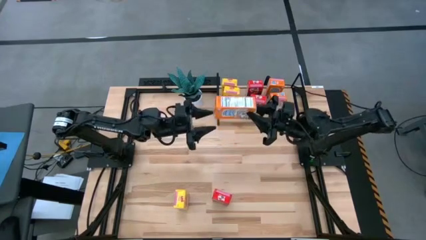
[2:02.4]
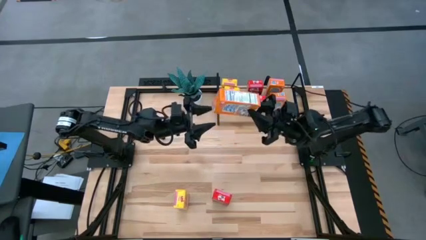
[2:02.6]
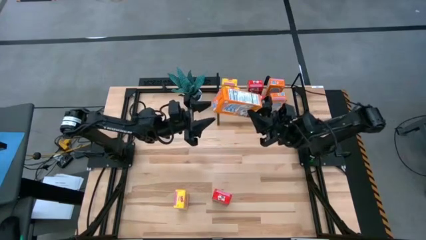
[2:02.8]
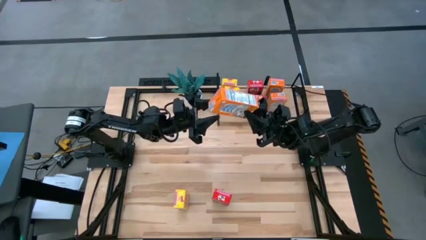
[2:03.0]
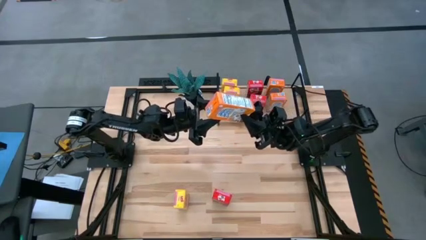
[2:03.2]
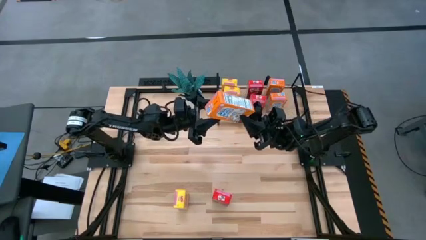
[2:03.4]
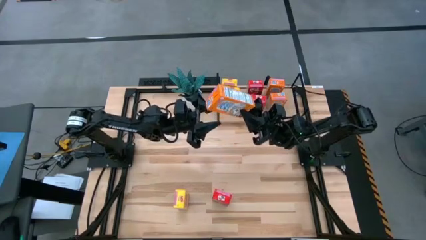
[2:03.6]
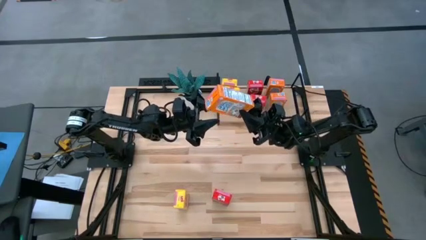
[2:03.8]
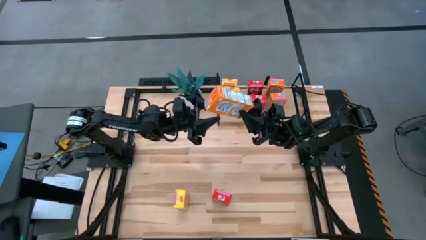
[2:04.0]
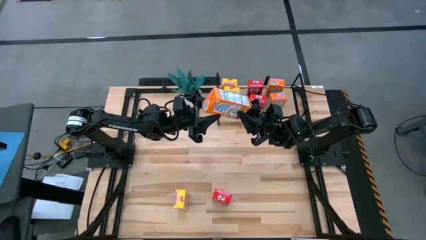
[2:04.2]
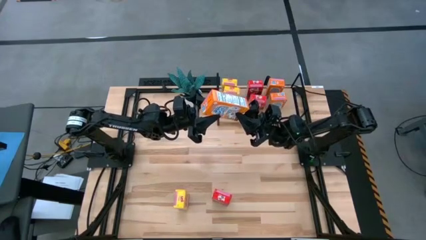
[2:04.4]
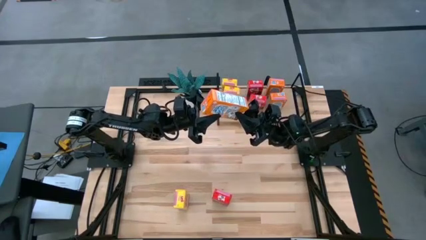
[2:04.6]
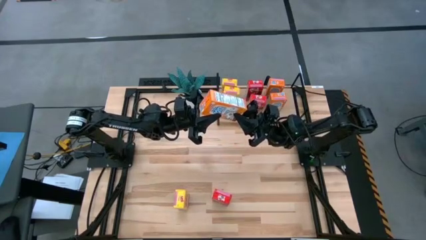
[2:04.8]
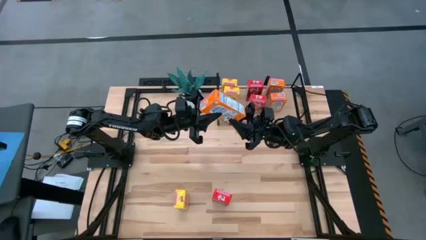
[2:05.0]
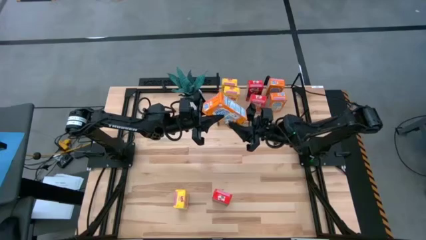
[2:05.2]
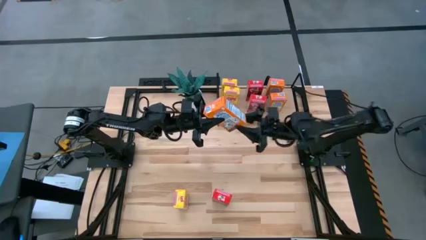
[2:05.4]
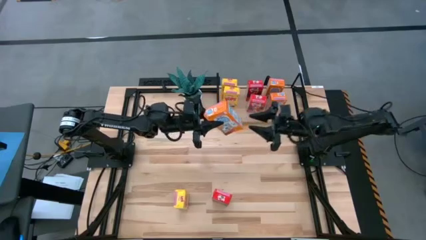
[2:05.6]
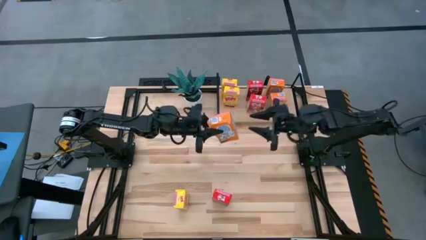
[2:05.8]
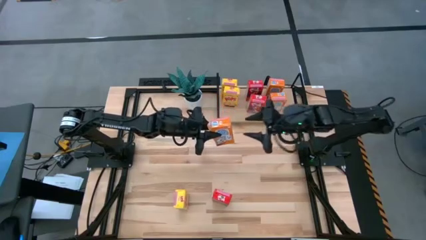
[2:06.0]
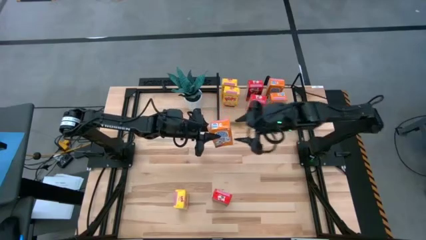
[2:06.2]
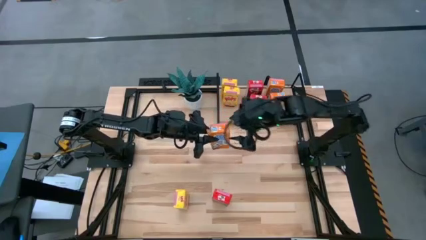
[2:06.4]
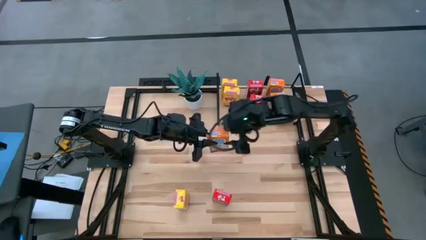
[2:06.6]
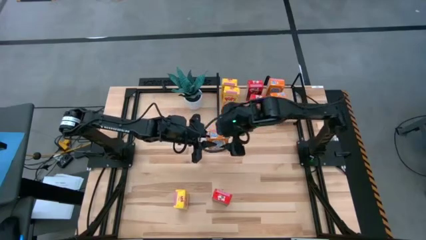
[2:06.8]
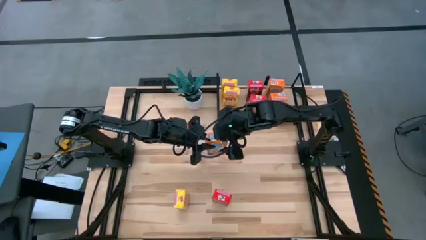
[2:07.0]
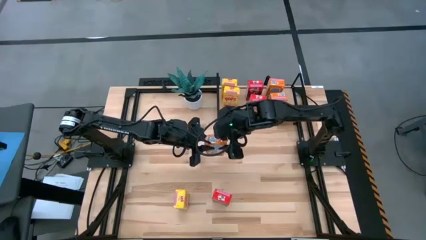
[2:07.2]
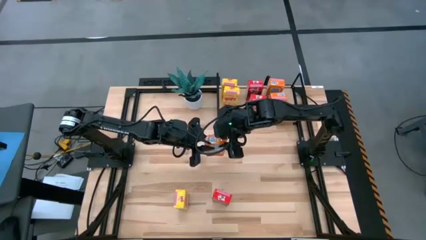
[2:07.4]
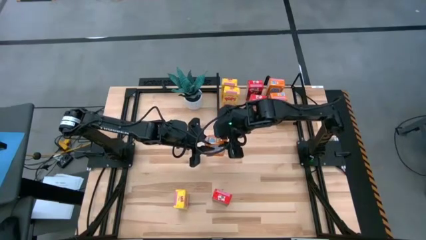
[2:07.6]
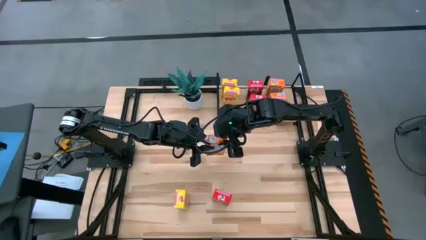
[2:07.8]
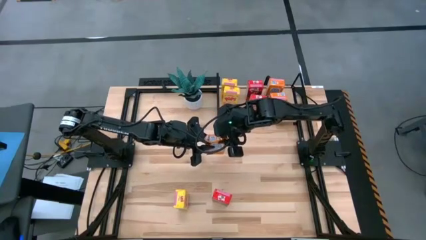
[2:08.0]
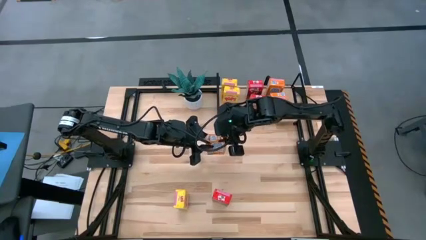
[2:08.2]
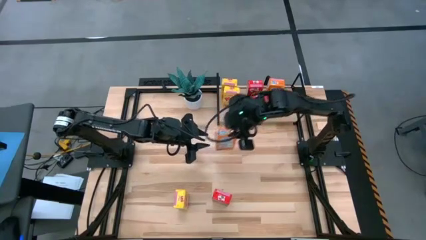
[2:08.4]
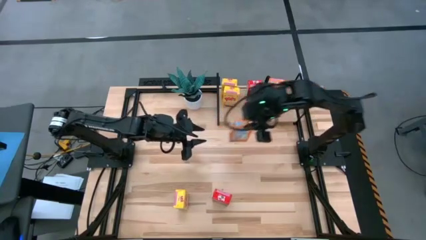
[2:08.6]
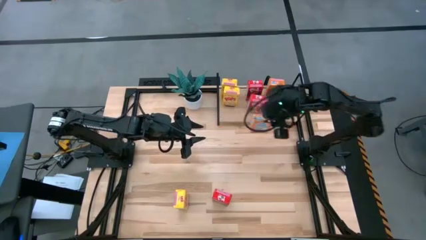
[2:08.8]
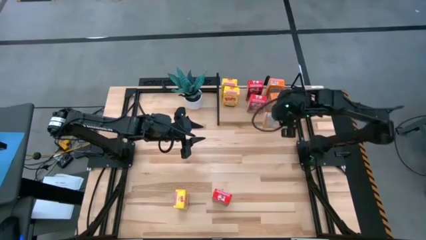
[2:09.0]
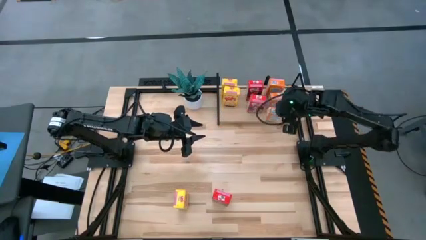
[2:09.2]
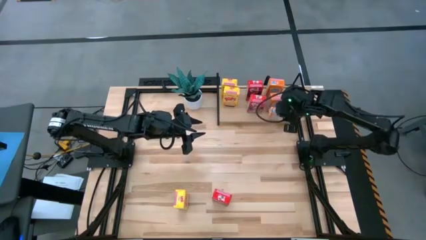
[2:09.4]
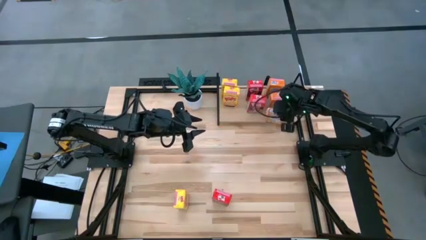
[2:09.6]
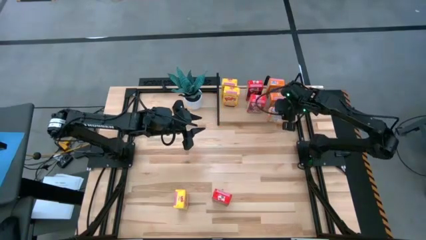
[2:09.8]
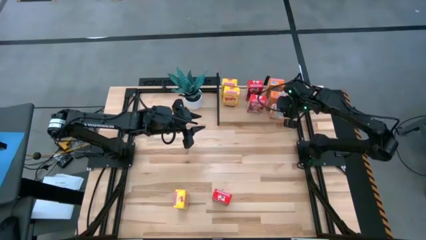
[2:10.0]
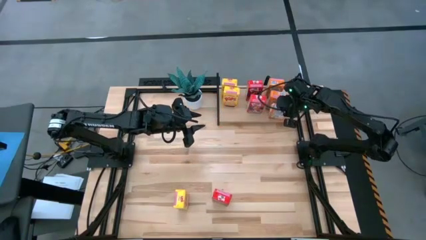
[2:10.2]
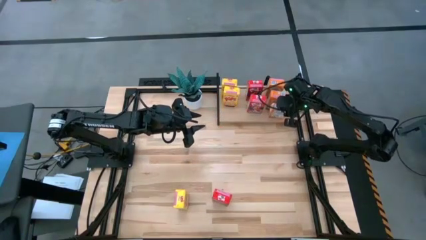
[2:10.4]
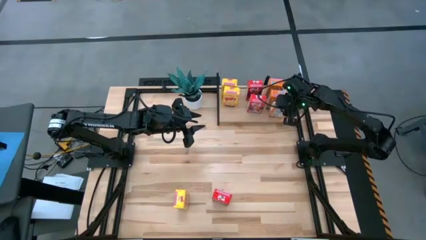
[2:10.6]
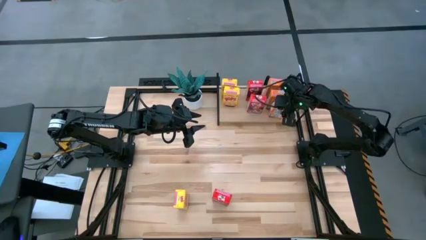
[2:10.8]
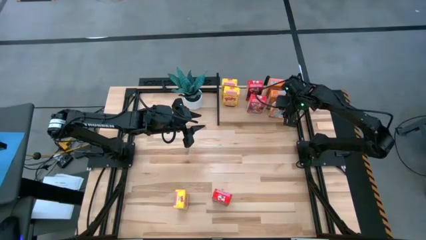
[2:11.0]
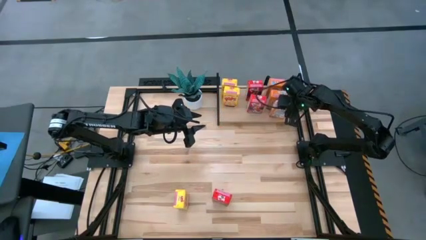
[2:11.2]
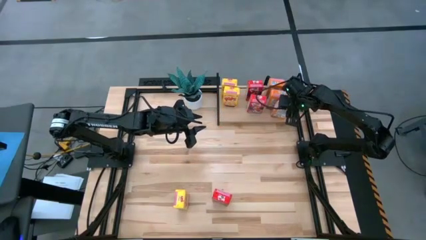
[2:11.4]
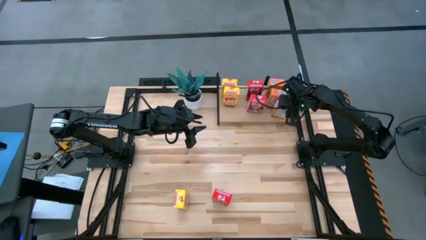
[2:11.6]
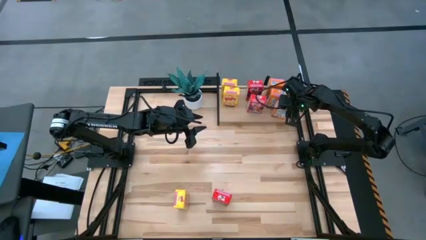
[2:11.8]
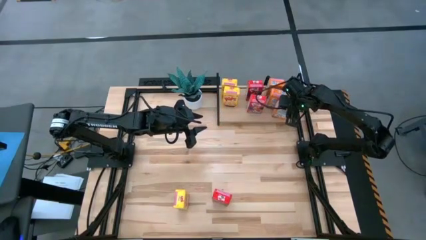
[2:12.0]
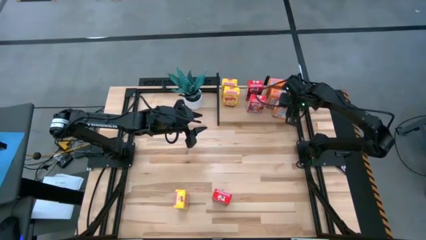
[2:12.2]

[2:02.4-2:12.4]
Task: Stack cereal on shelf
Put the orange cereal box on the shelf aligned with orange cereal boxes

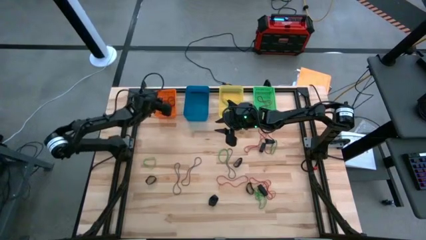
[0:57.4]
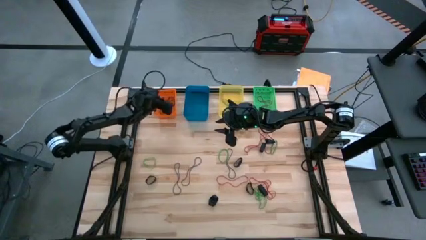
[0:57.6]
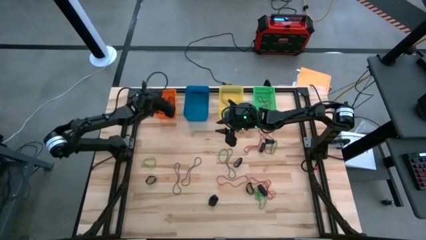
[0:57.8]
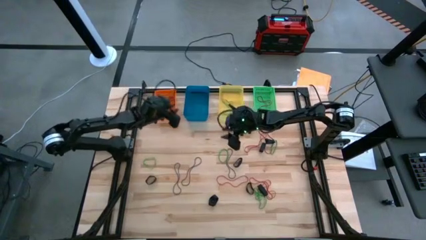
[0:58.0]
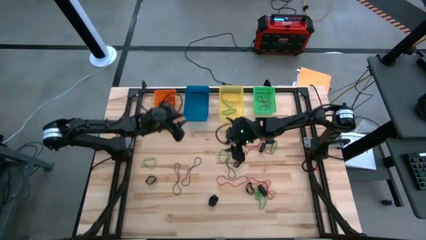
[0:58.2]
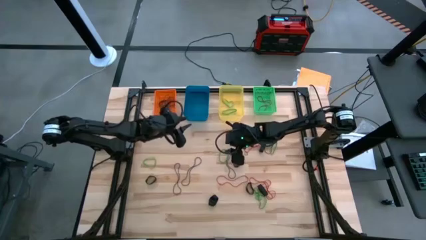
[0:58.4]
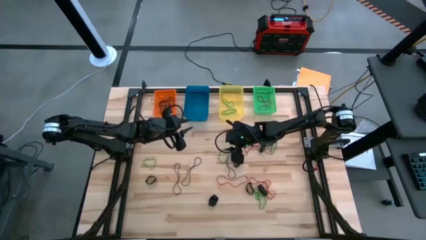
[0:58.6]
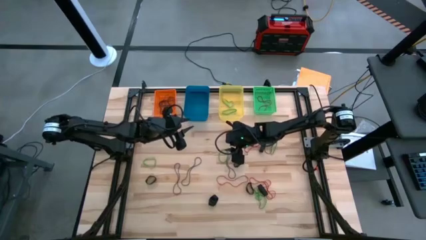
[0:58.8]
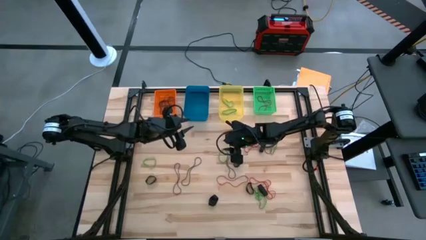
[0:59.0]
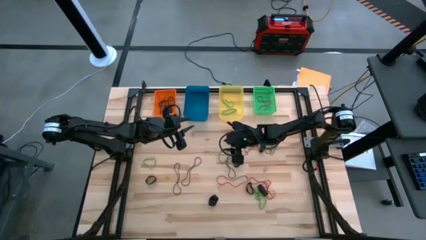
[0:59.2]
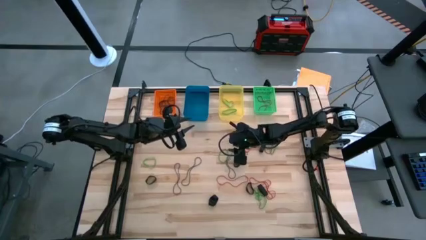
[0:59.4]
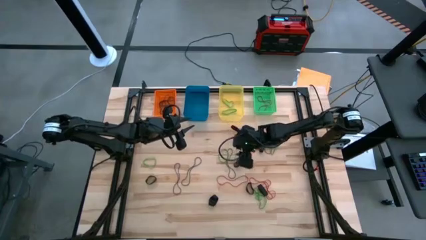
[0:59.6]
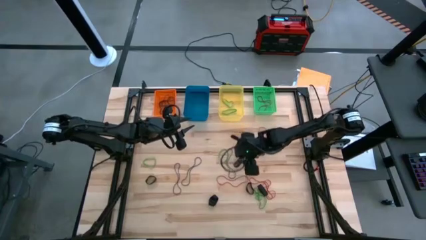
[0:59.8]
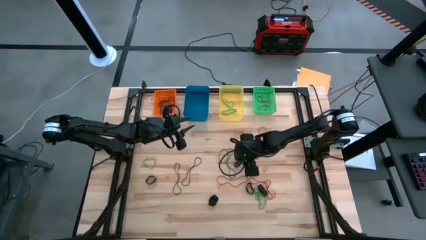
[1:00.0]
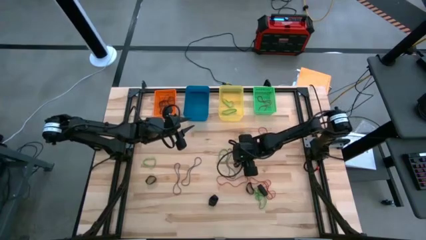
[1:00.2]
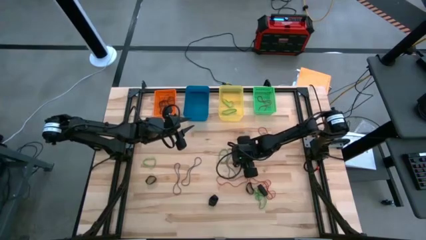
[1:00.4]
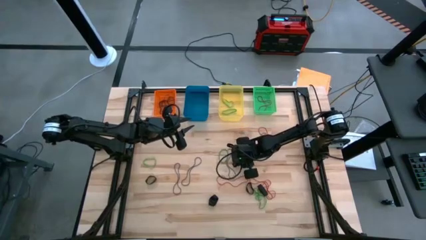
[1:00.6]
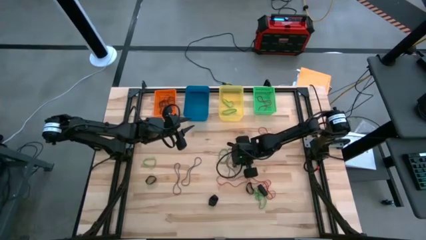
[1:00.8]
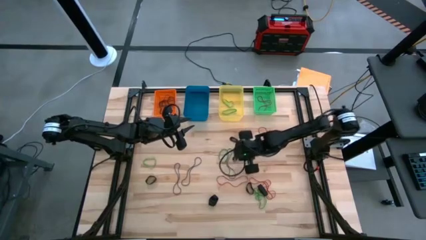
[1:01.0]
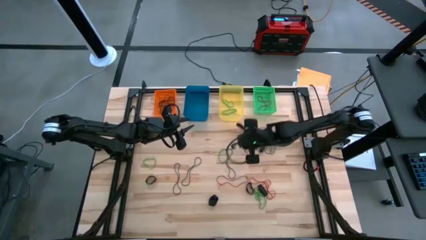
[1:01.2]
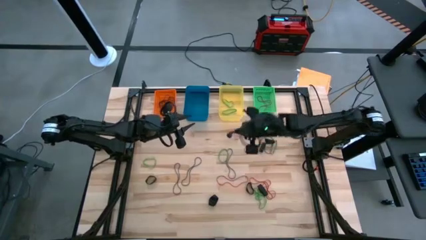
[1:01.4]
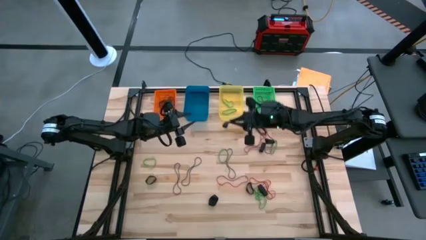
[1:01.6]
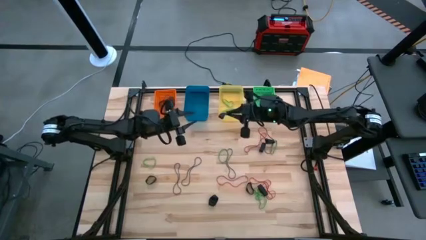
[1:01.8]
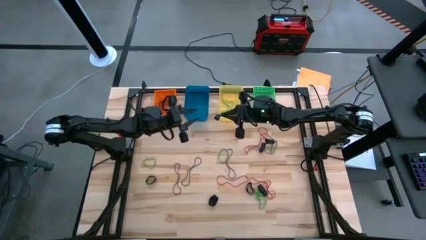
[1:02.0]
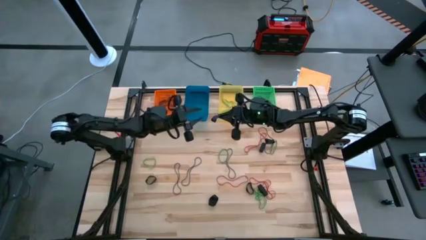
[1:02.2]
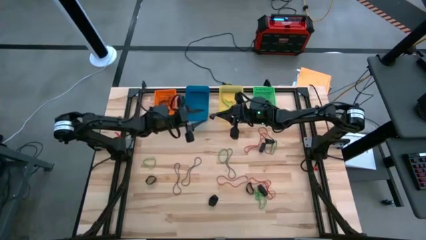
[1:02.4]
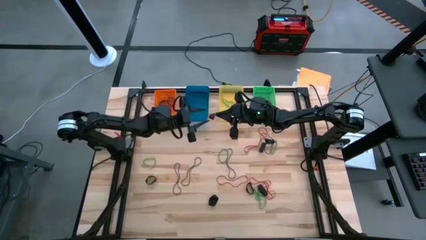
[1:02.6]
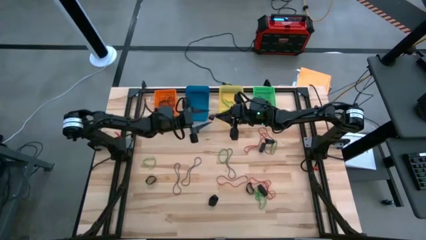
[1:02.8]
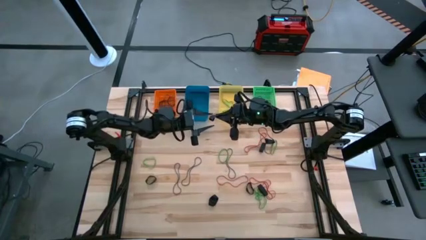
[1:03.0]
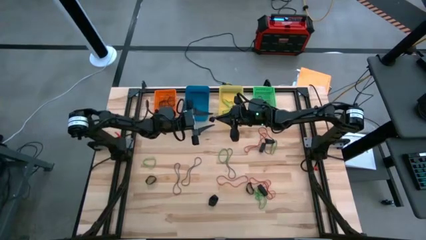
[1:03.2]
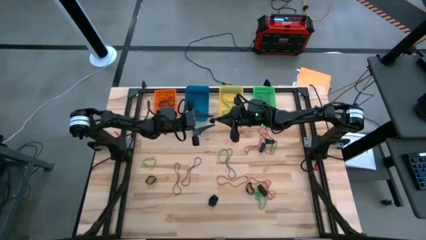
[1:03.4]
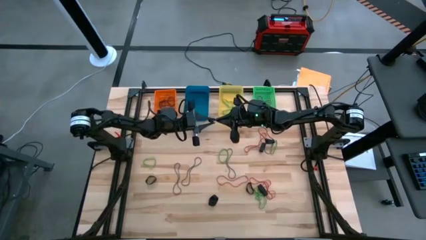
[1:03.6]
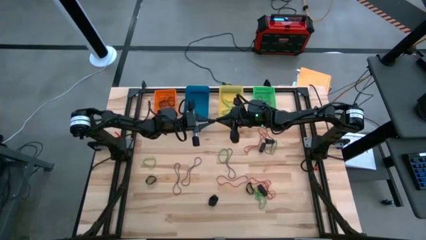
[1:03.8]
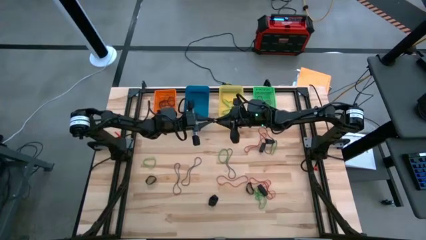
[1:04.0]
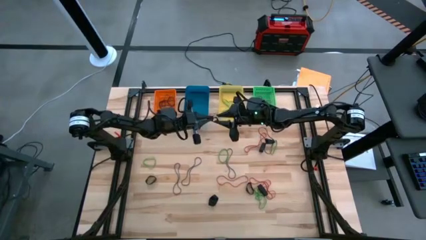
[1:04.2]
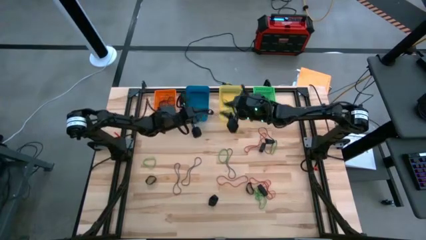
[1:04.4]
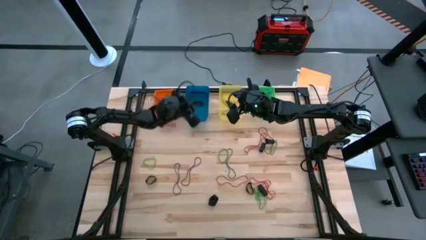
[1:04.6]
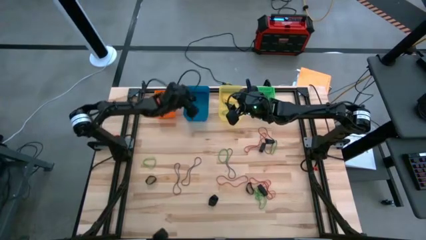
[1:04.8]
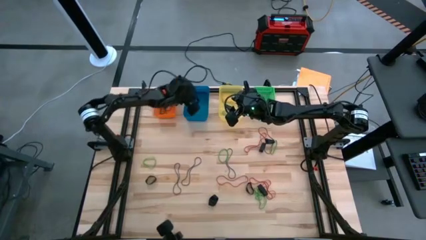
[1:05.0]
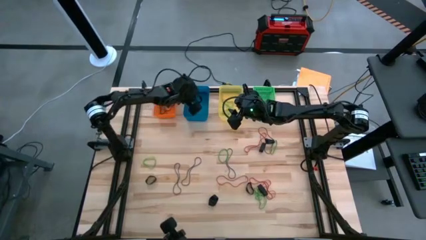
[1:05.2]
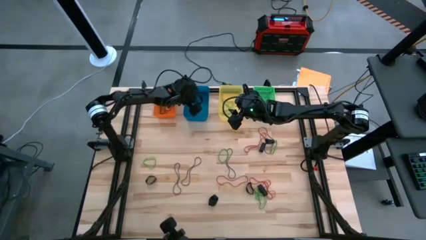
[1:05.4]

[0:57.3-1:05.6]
Task: Sort rubber bands into baskets
Put the black rubber band into the blue bin
